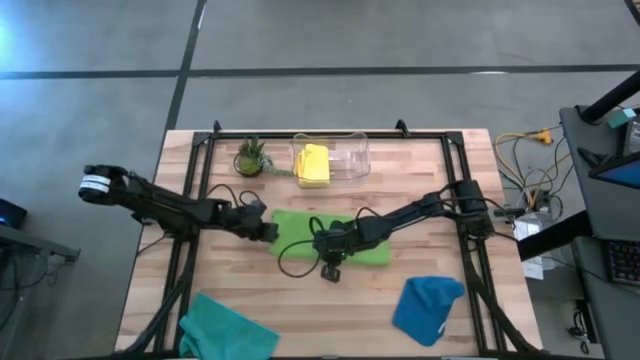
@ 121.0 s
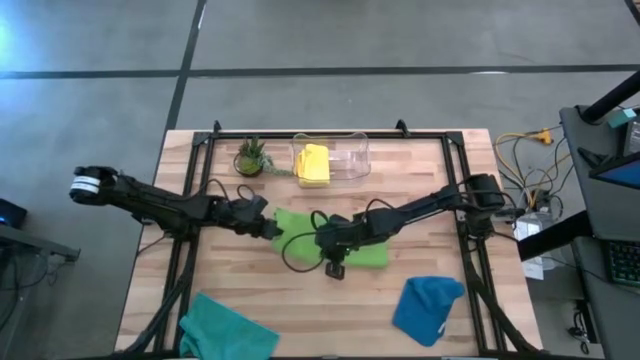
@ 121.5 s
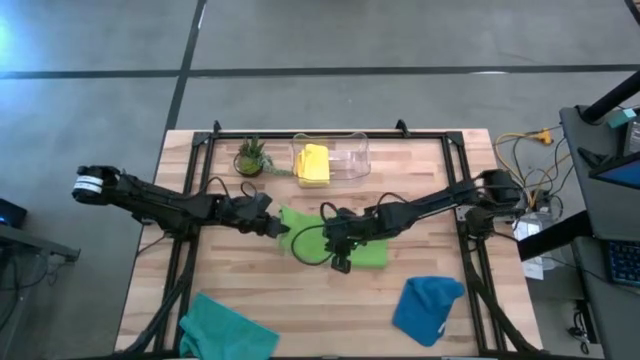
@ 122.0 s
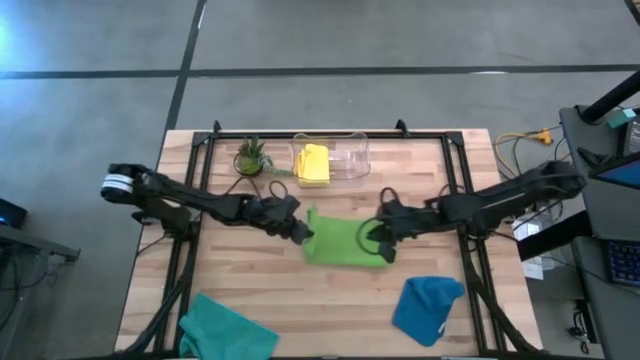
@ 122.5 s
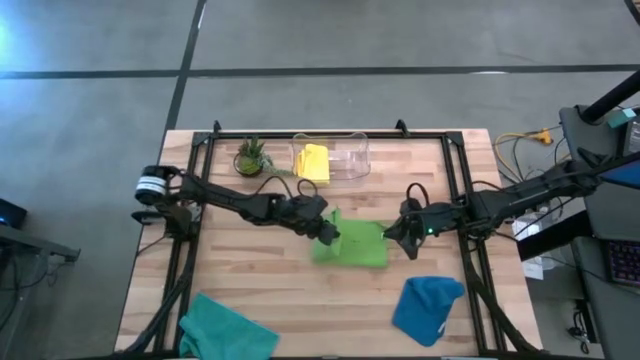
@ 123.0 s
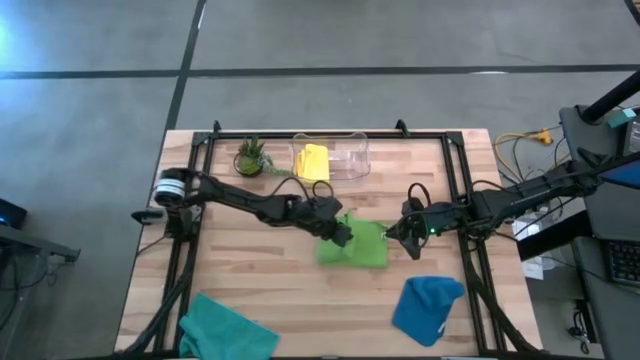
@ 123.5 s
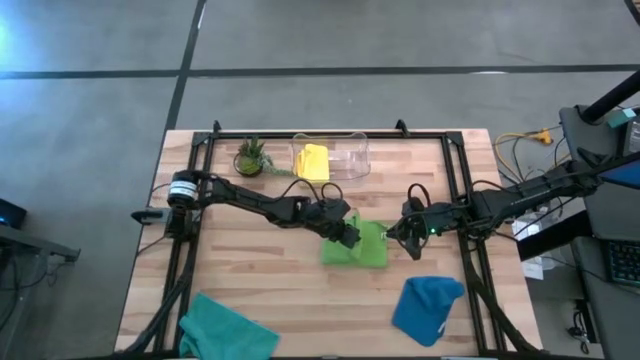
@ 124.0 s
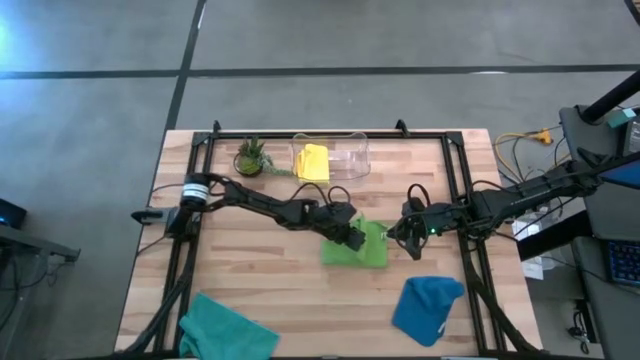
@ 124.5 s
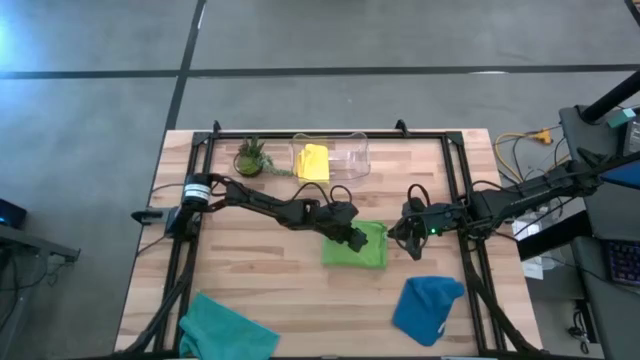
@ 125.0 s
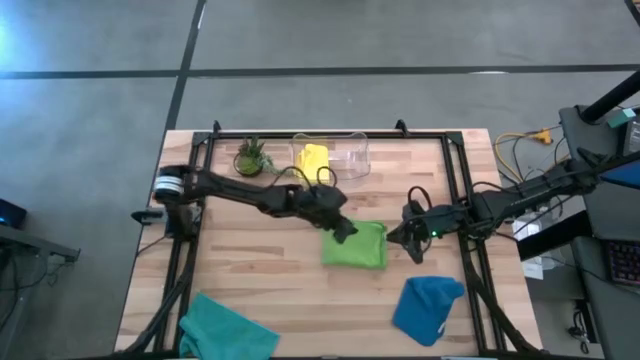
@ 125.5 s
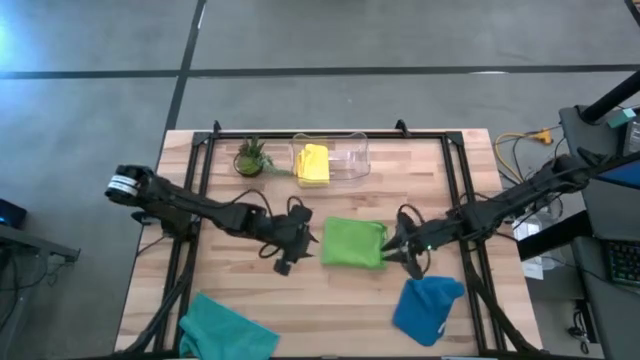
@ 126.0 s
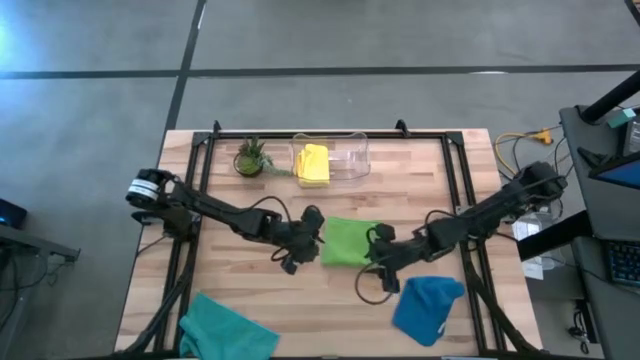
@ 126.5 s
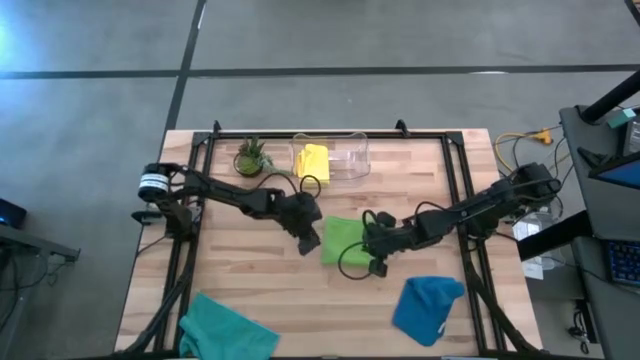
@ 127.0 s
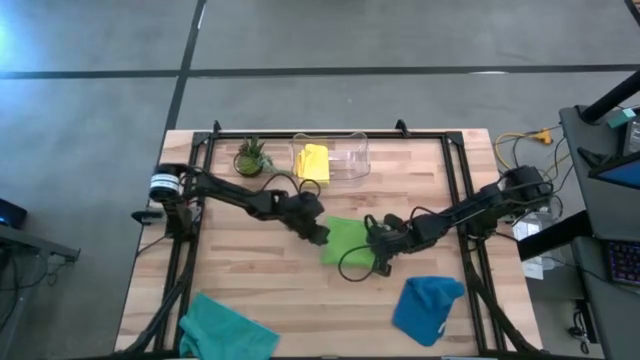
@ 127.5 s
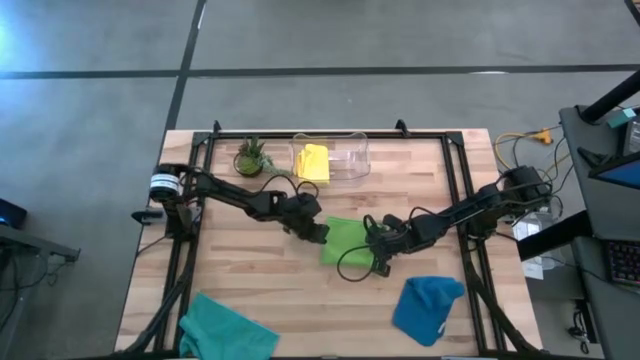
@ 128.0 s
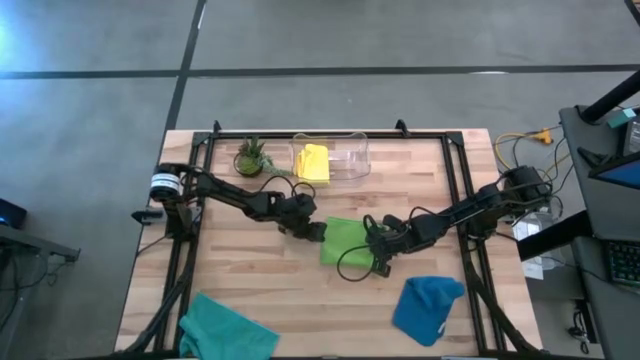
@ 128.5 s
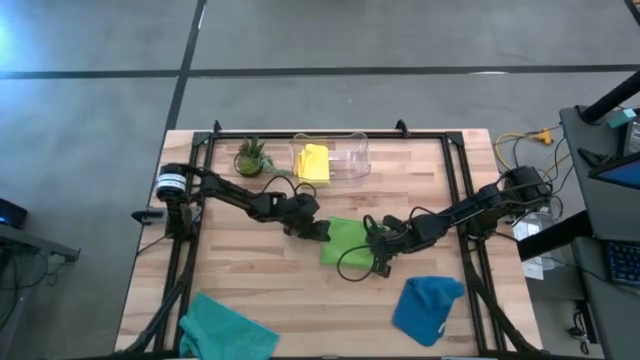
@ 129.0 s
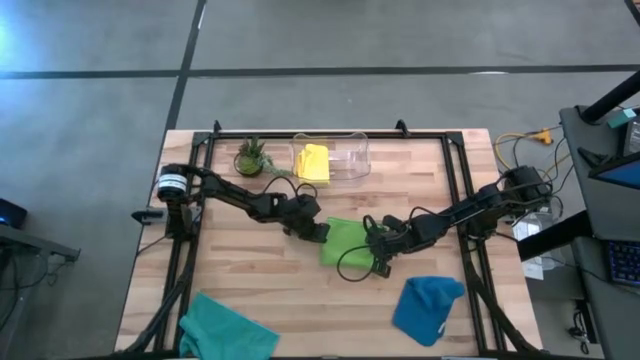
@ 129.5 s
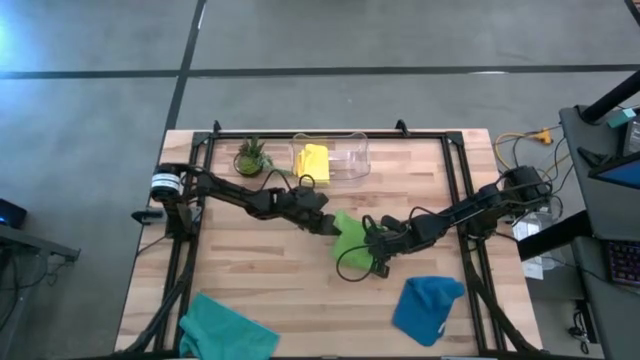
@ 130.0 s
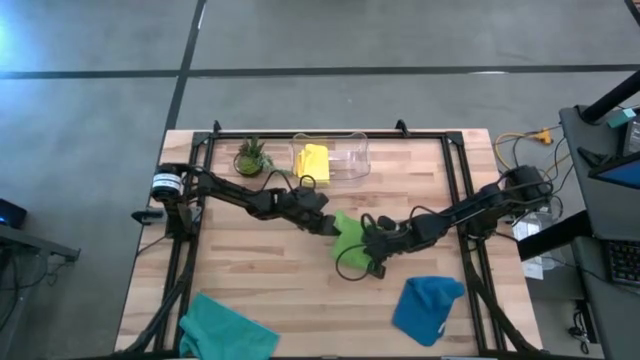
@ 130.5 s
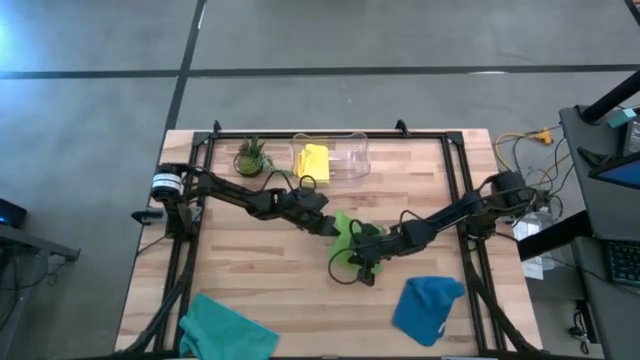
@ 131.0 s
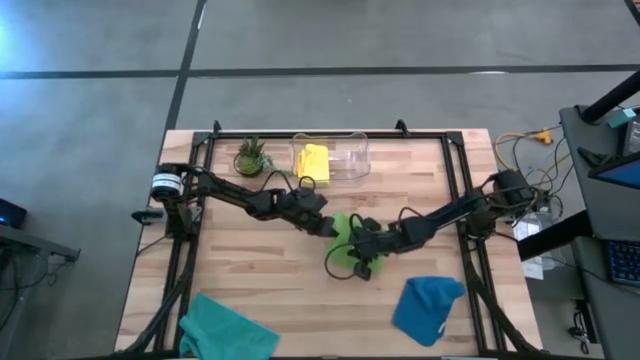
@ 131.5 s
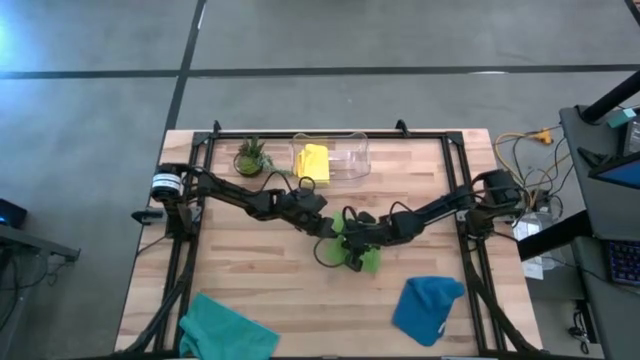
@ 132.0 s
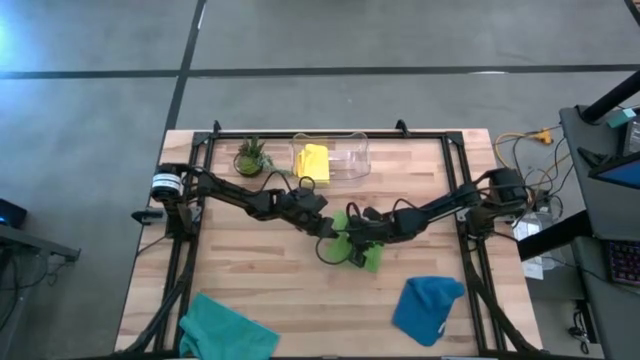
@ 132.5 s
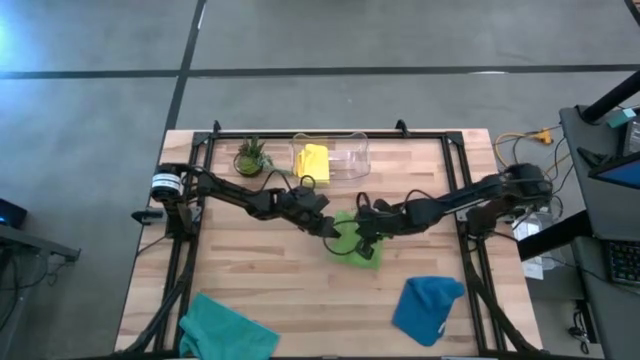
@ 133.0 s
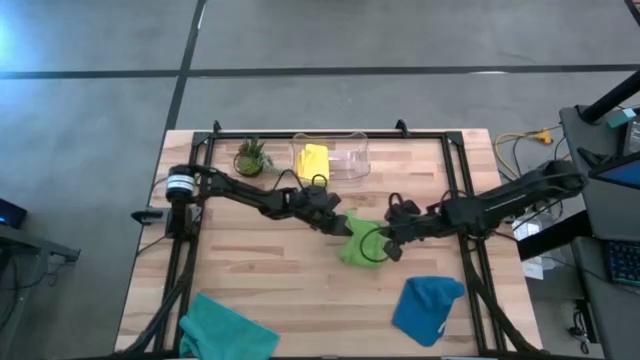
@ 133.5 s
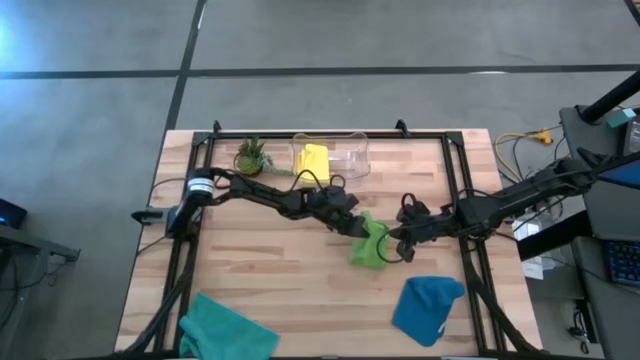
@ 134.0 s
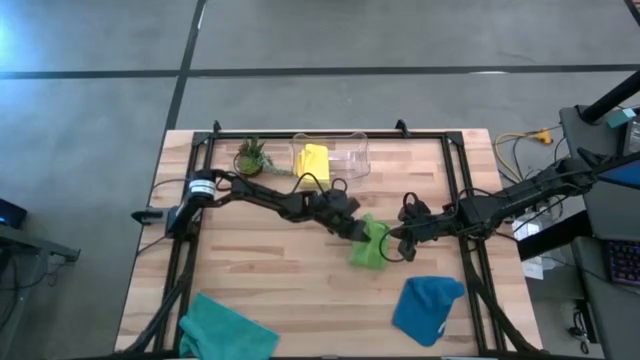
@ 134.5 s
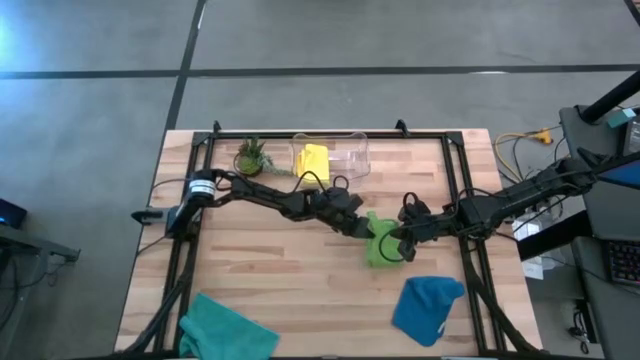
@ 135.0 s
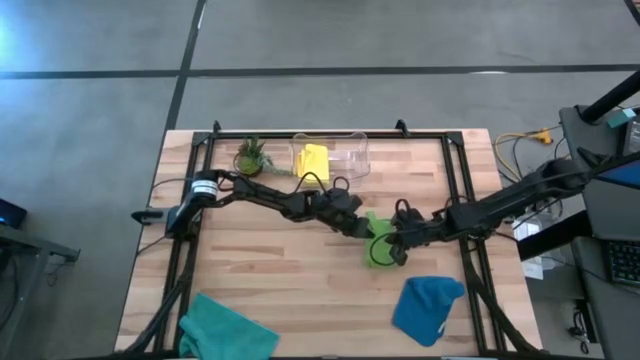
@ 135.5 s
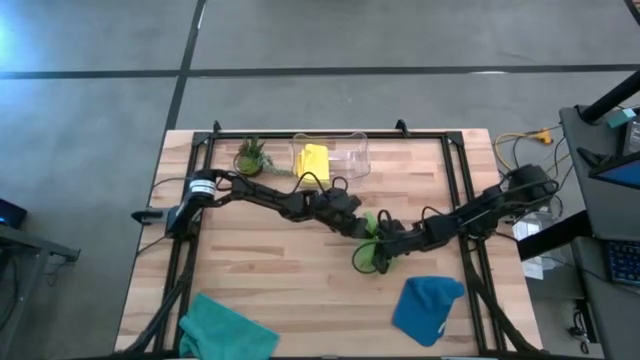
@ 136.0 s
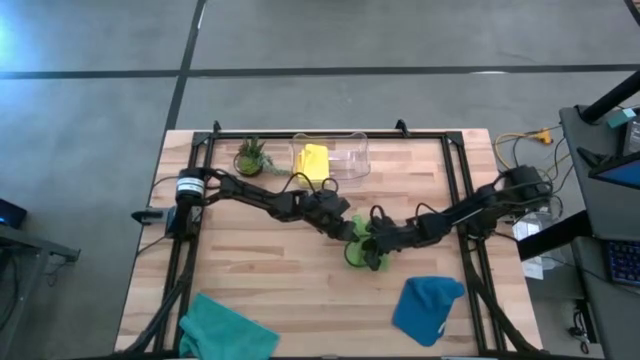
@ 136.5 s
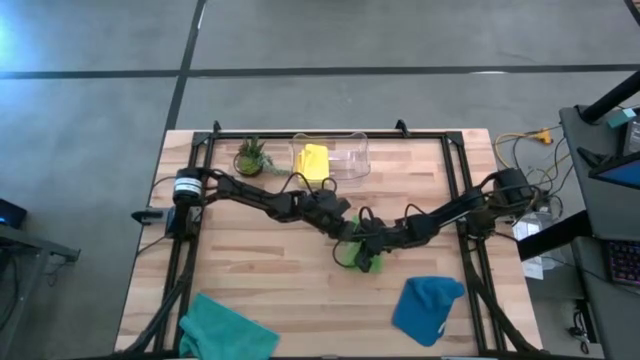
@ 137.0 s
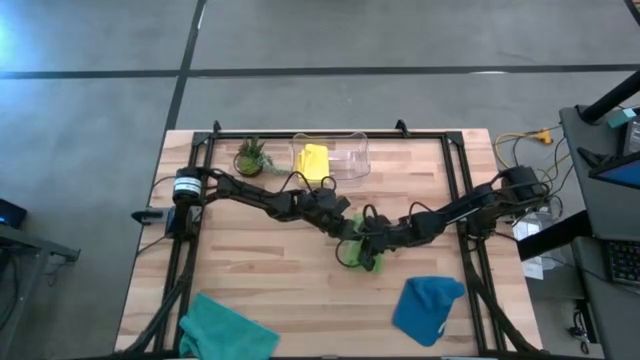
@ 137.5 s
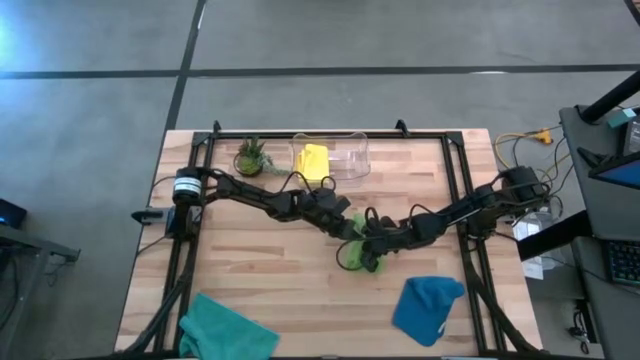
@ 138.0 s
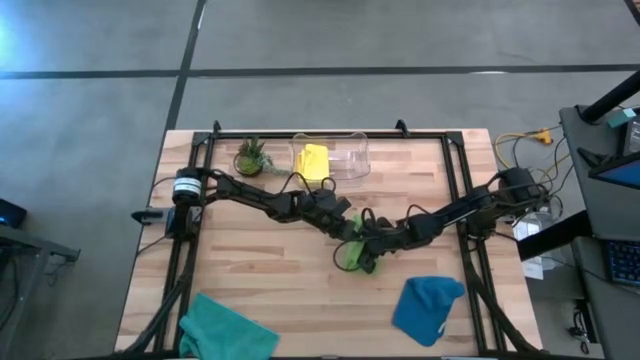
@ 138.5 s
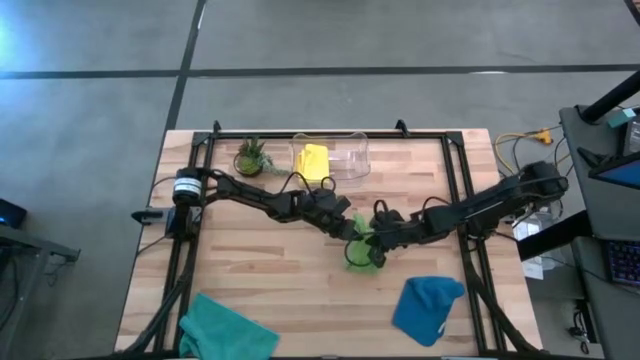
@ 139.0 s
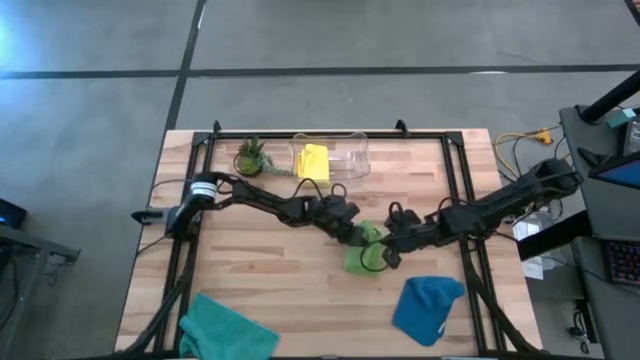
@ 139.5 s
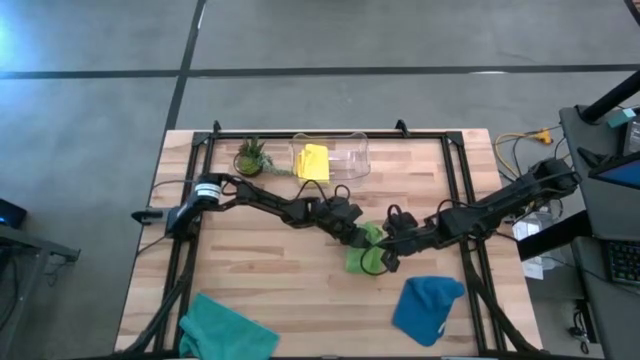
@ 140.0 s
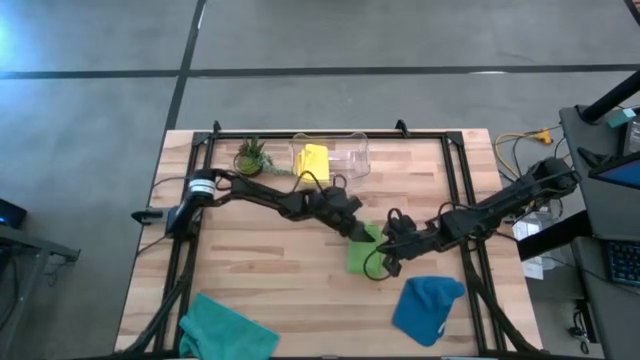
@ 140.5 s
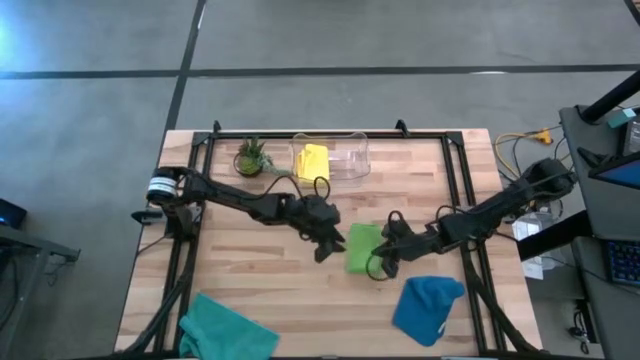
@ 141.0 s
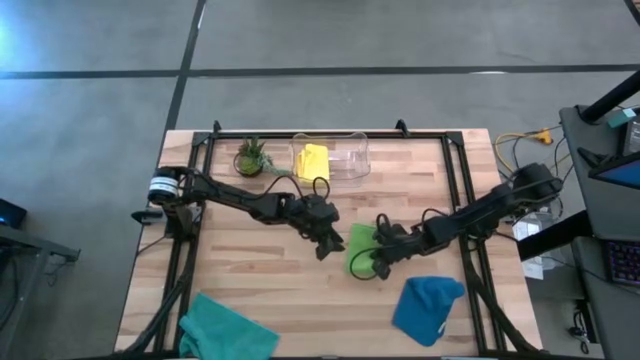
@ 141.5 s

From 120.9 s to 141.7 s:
Task: Fold microfiber towels
Fold the green microfiber towel
